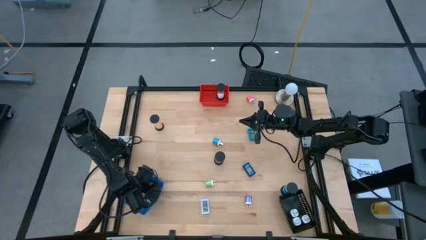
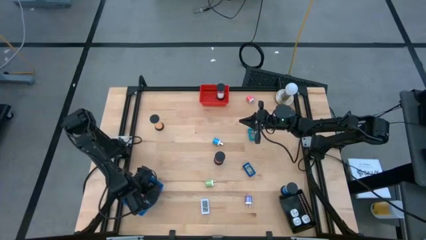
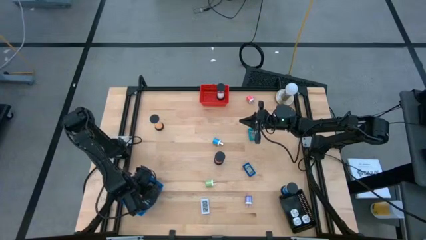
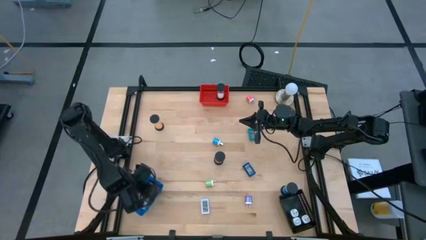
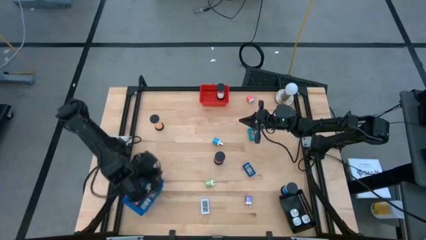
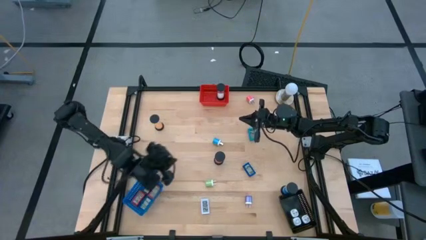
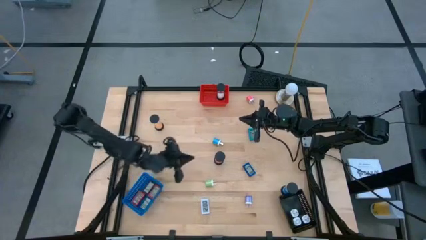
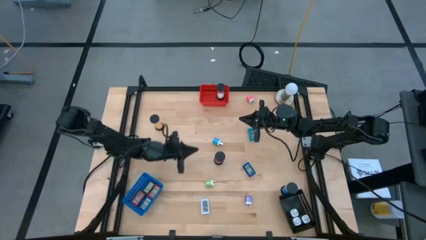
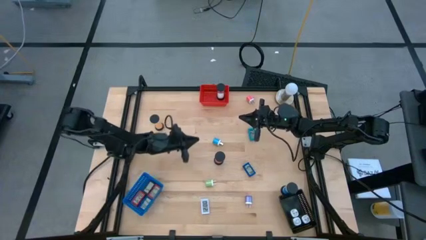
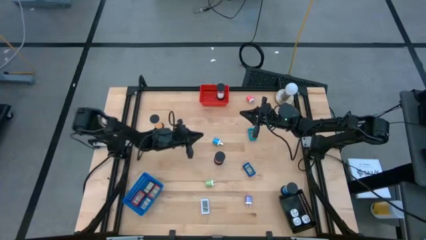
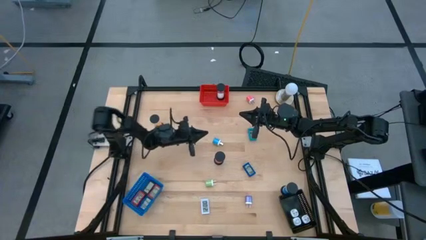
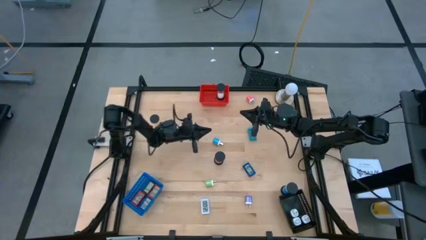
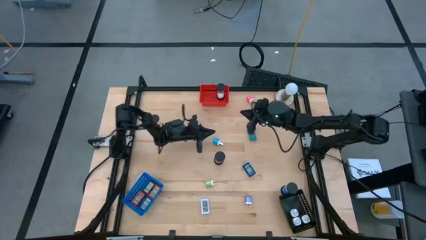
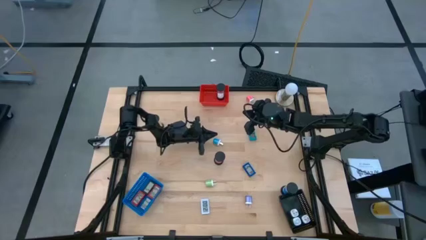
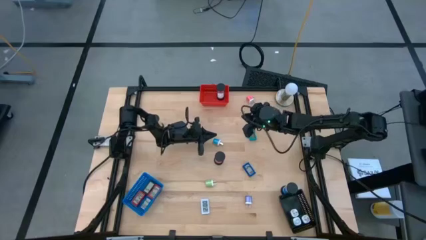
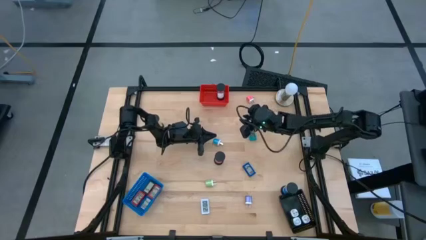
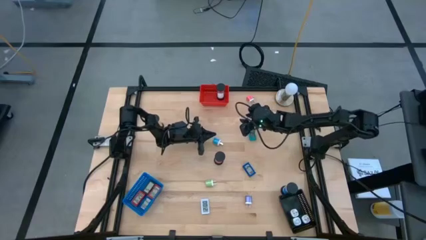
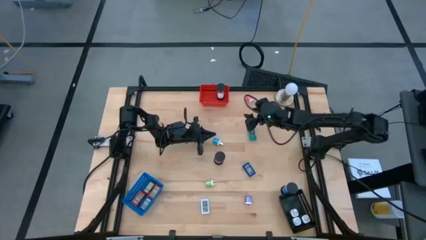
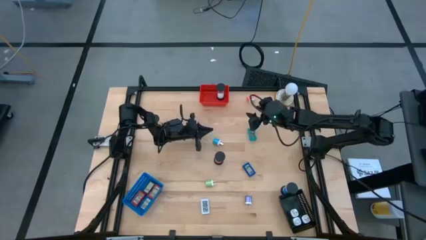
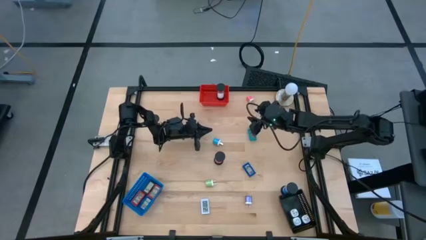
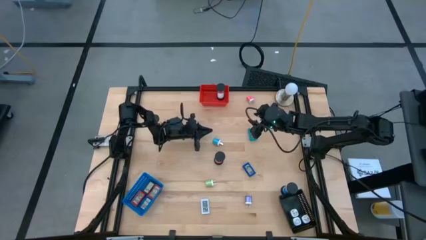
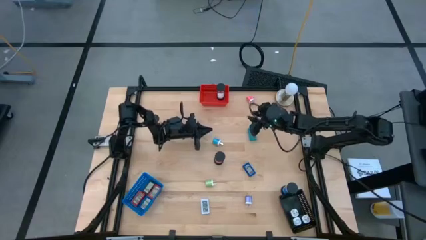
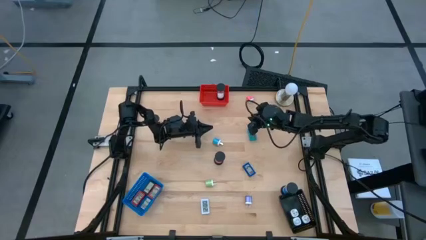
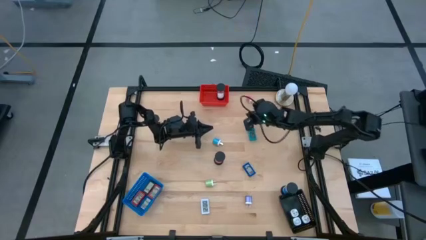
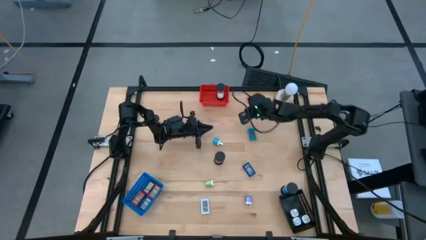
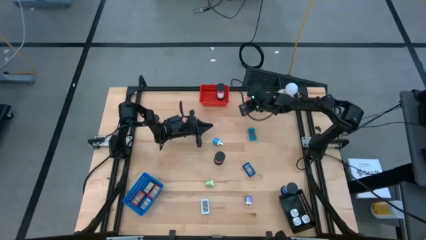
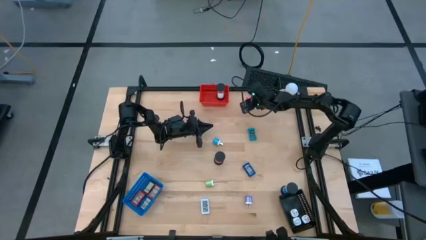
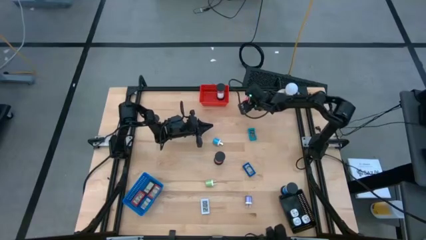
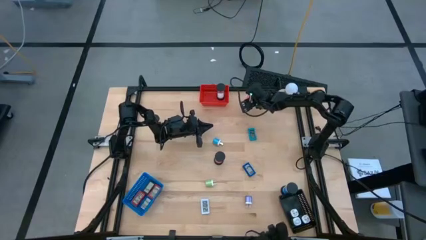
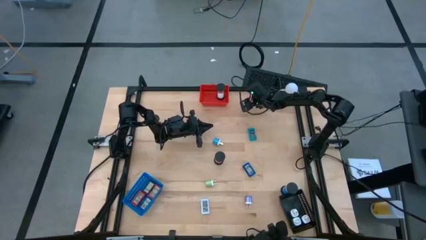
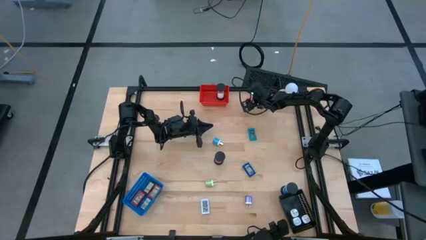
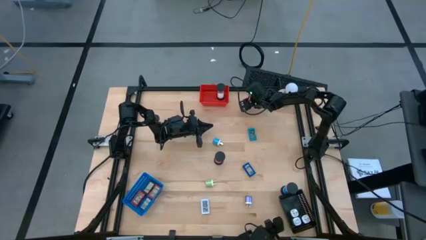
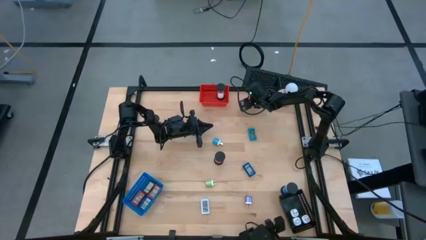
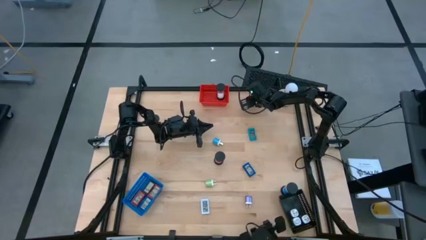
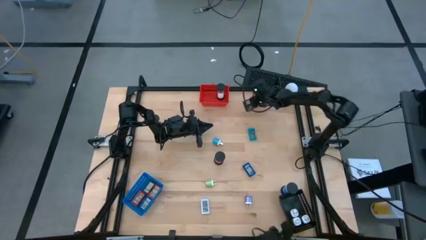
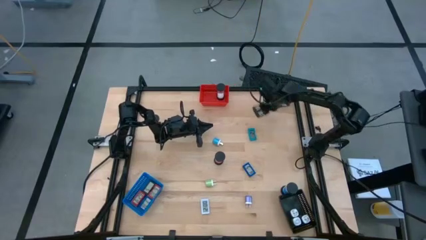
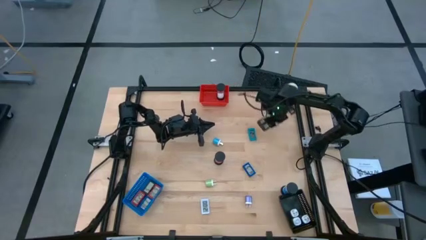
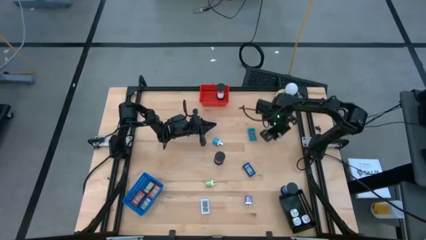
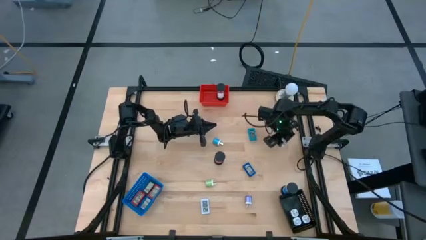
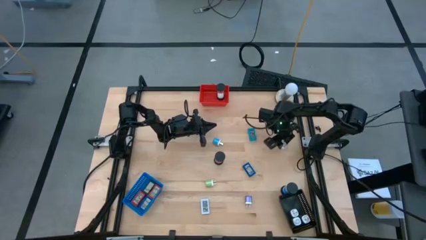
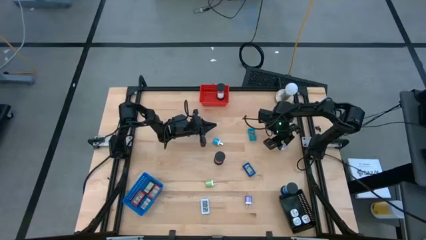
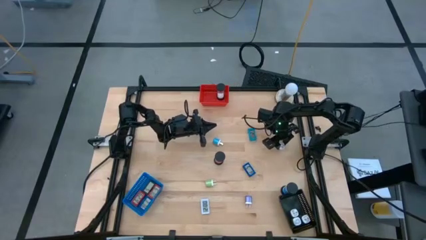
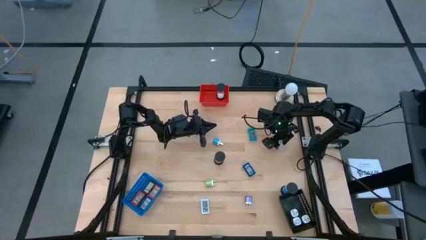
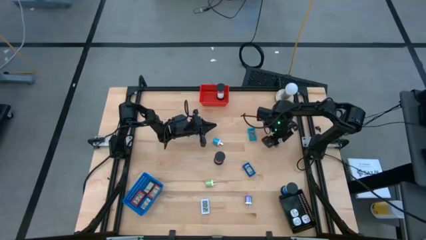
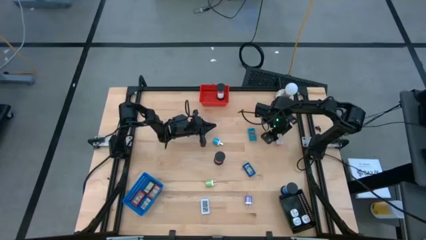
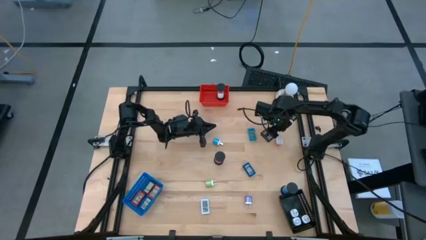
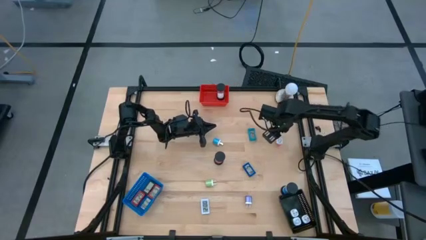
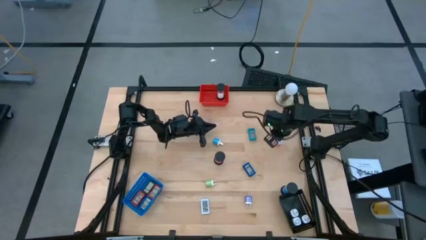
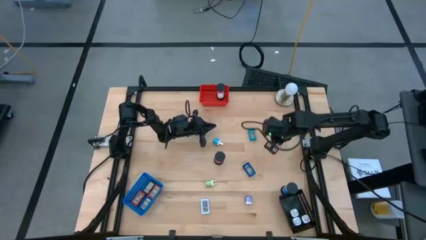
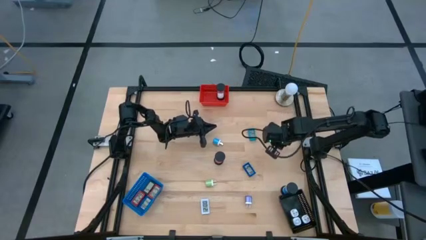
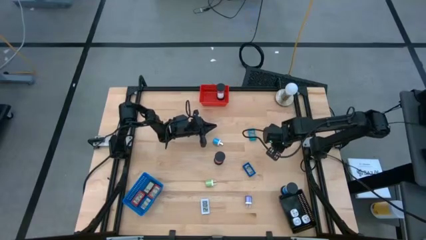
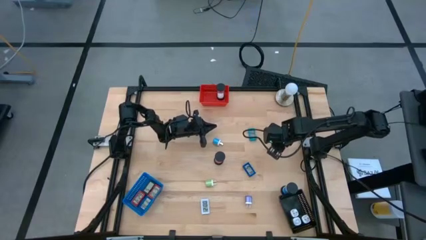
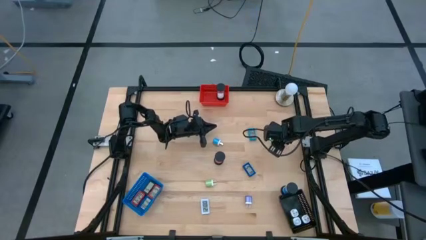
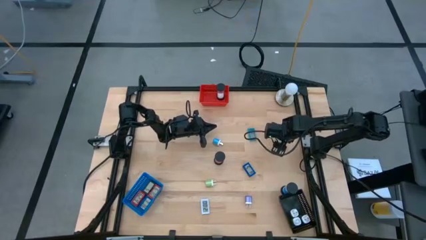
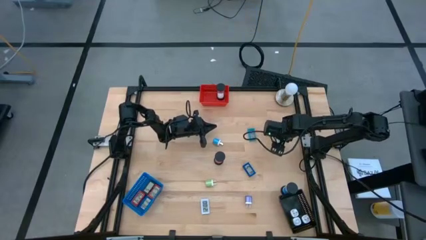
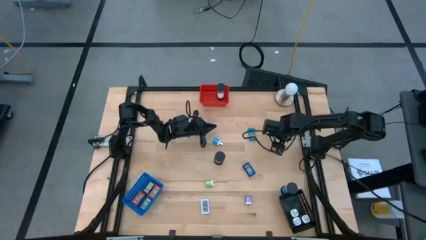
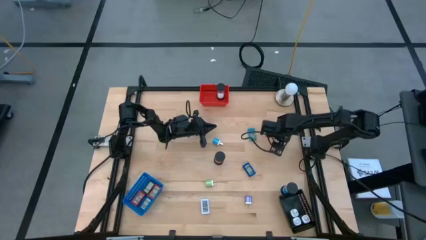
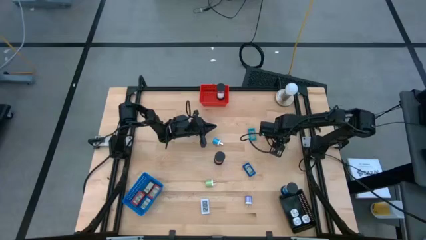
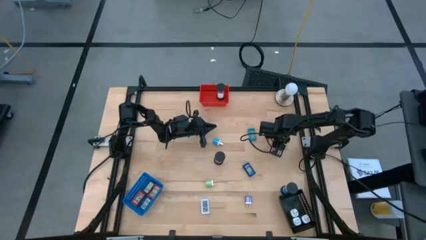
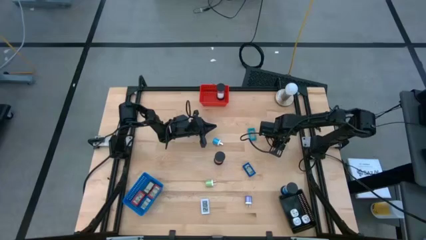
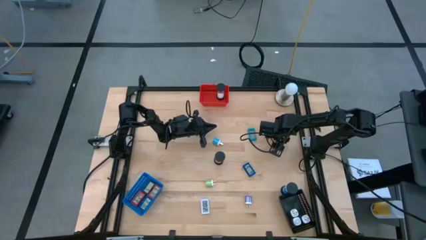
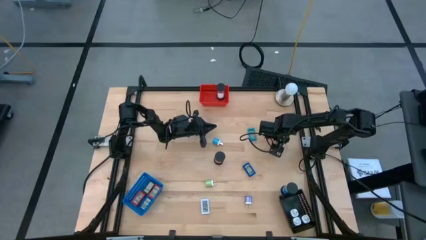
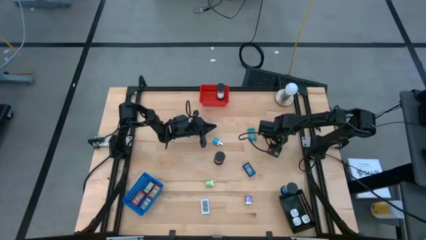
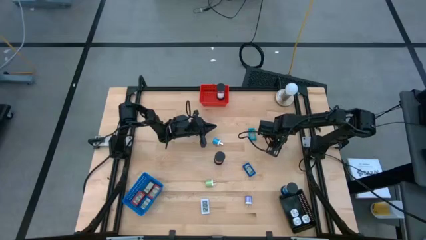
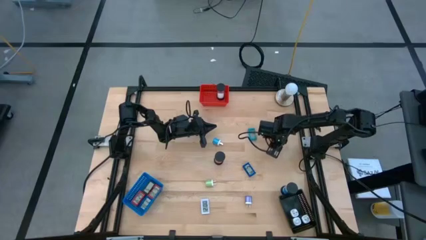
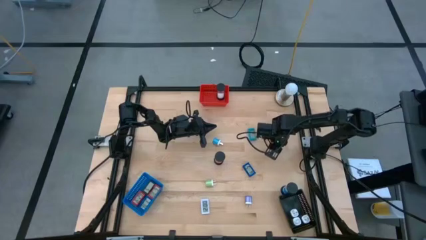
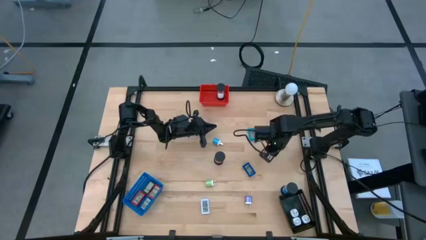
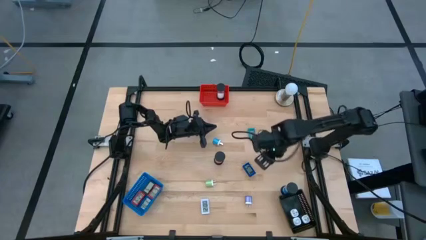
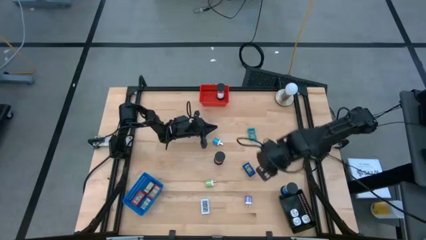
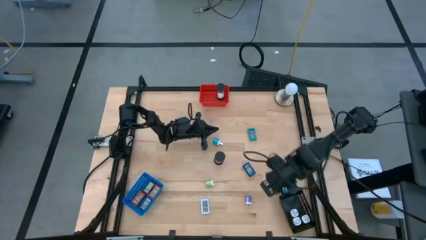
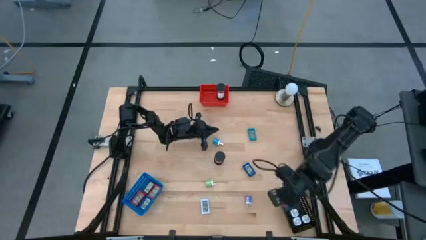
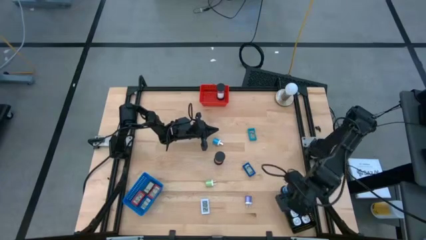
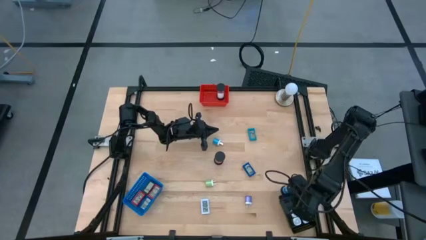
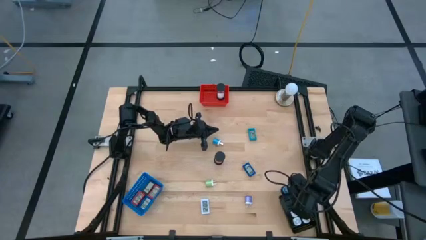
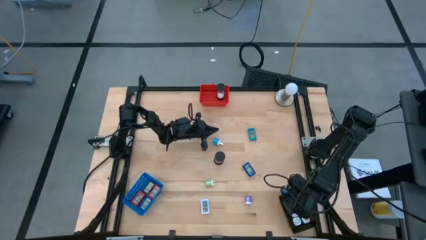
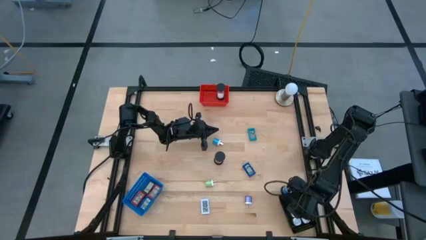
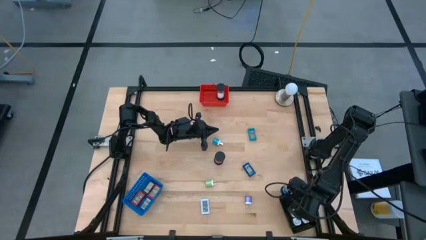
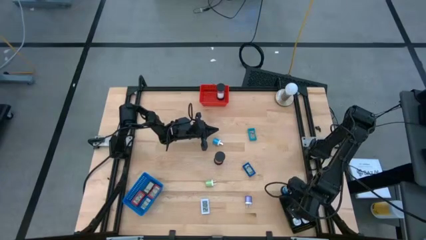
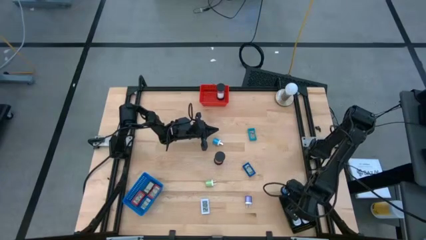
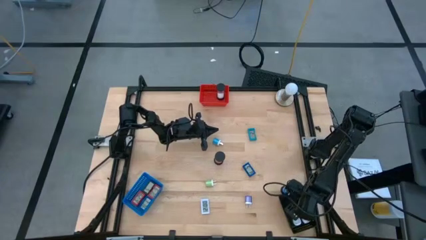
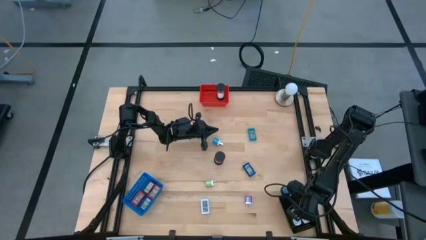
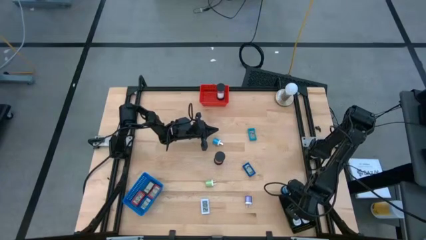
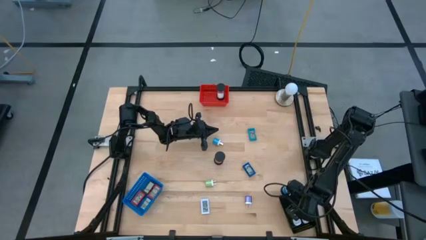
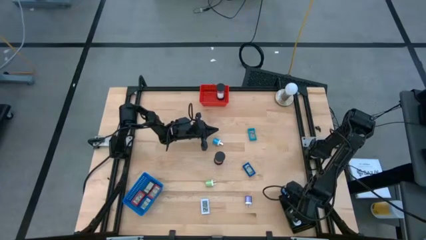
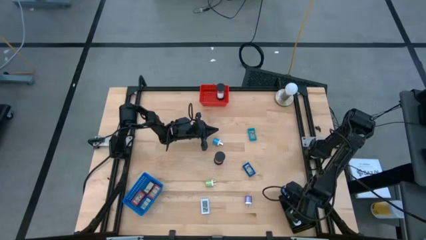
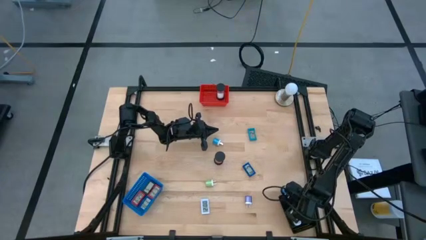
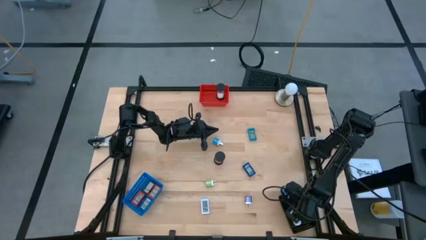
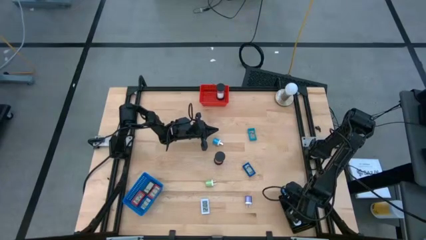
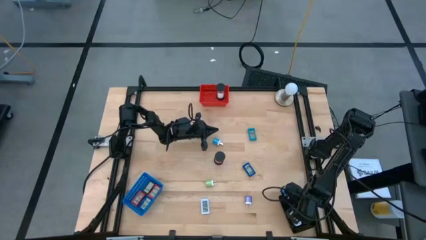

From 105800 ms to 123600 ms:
Task: Pick & Place Office items
Put the red charger adapter into the black bin
